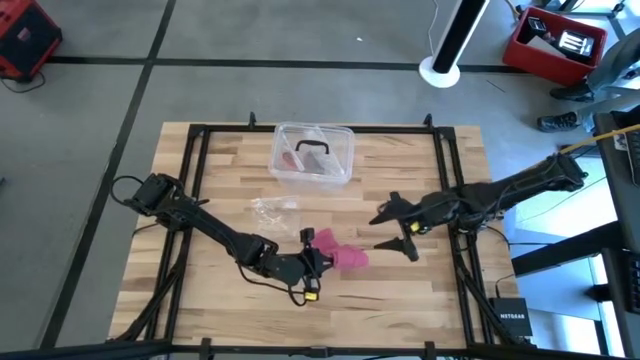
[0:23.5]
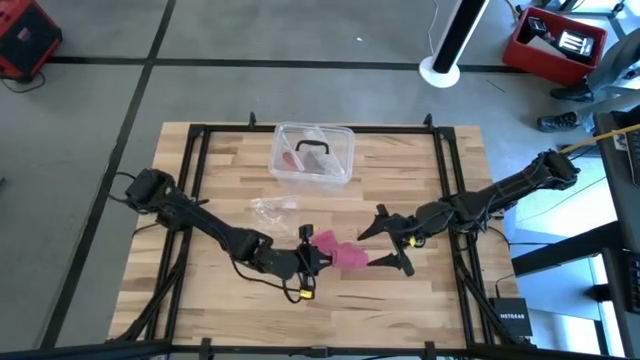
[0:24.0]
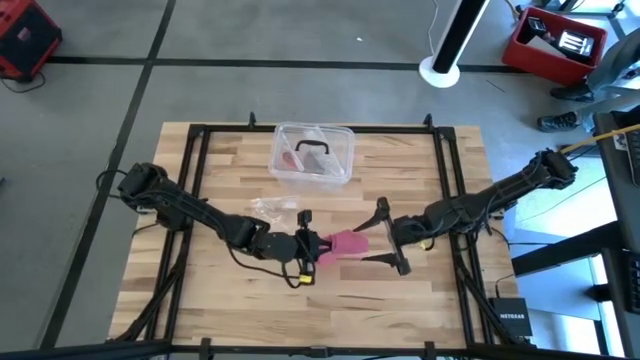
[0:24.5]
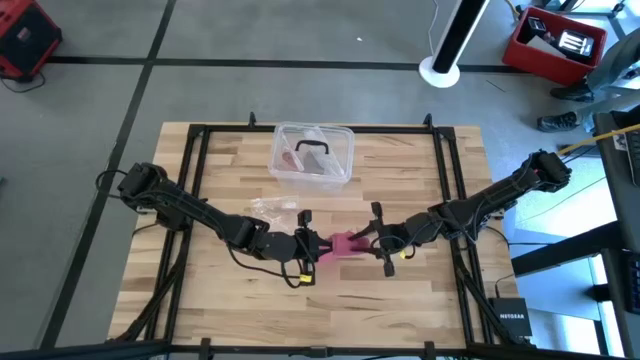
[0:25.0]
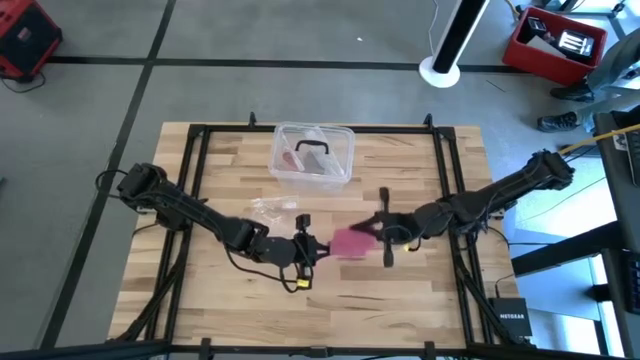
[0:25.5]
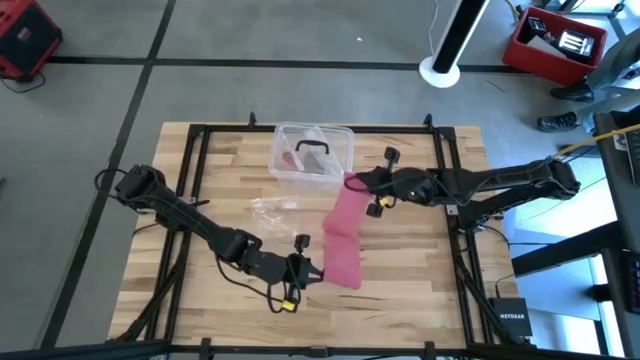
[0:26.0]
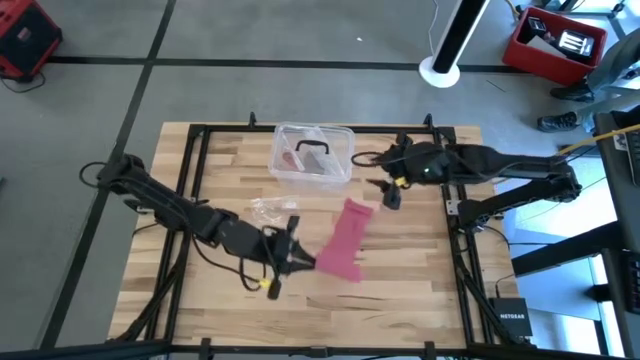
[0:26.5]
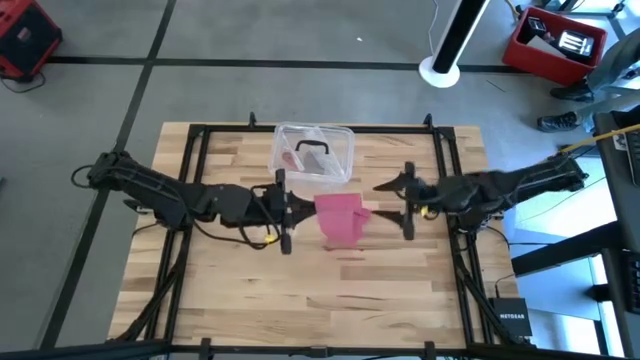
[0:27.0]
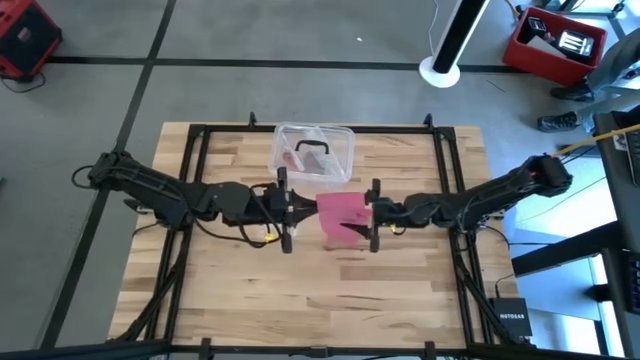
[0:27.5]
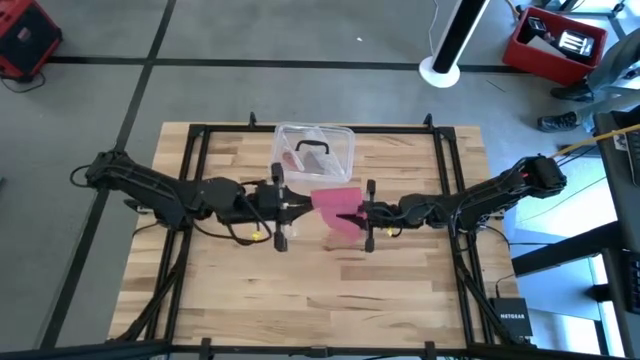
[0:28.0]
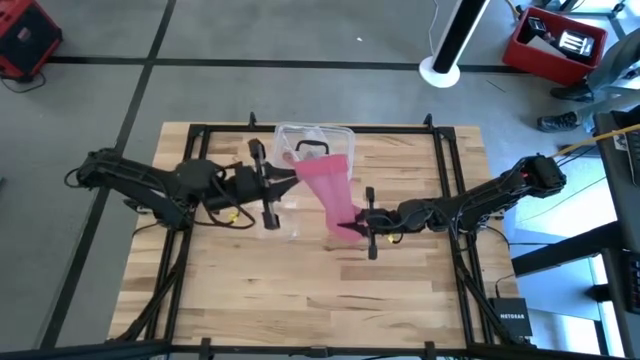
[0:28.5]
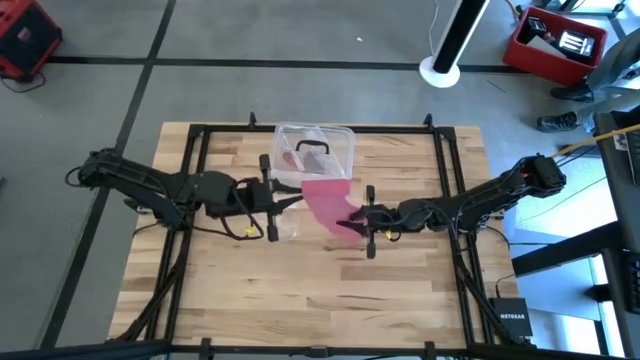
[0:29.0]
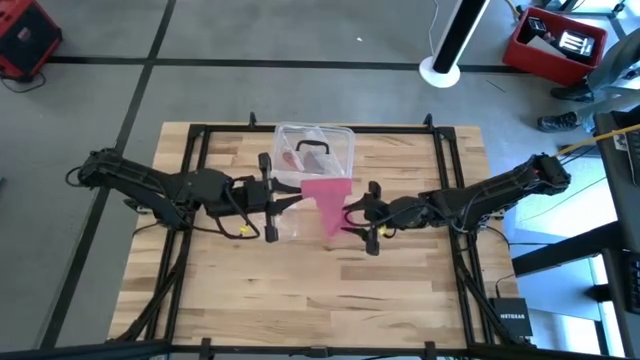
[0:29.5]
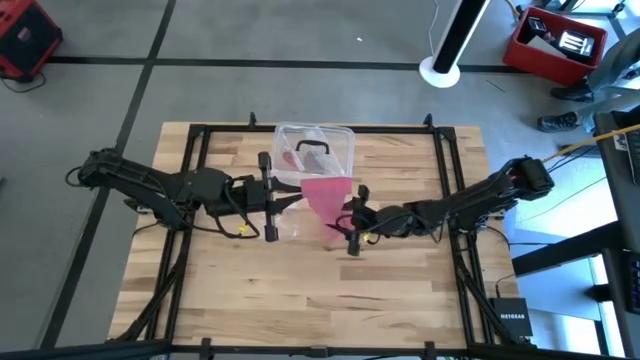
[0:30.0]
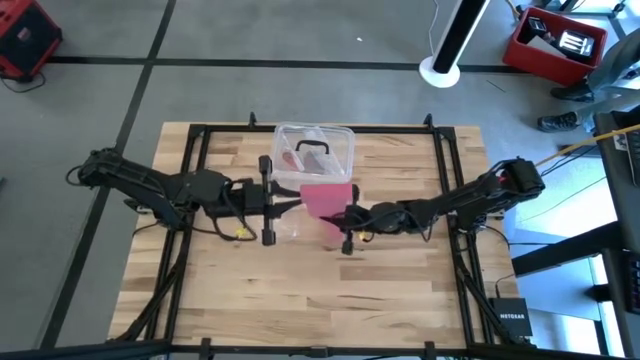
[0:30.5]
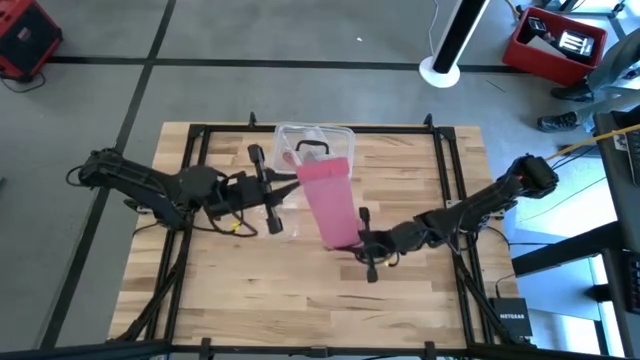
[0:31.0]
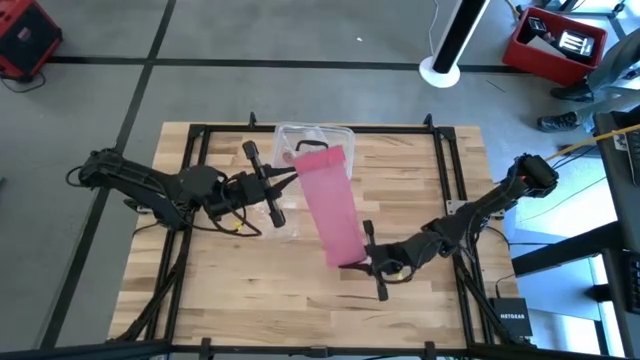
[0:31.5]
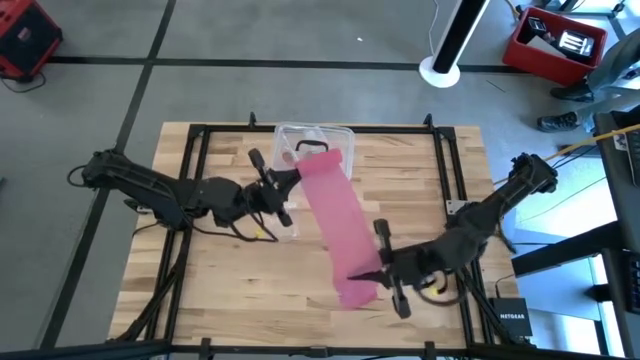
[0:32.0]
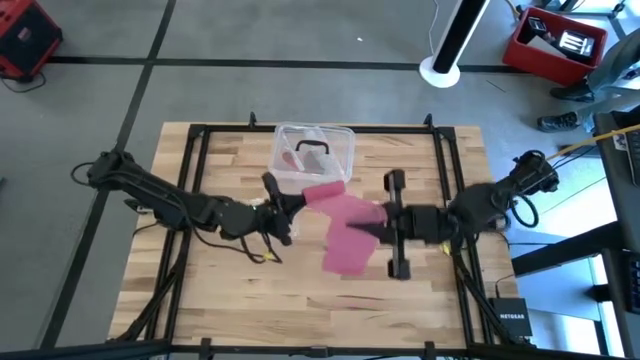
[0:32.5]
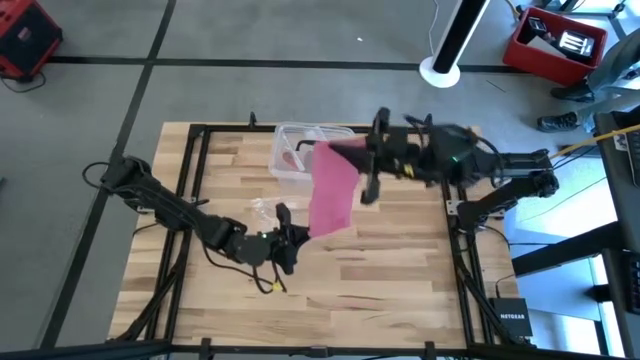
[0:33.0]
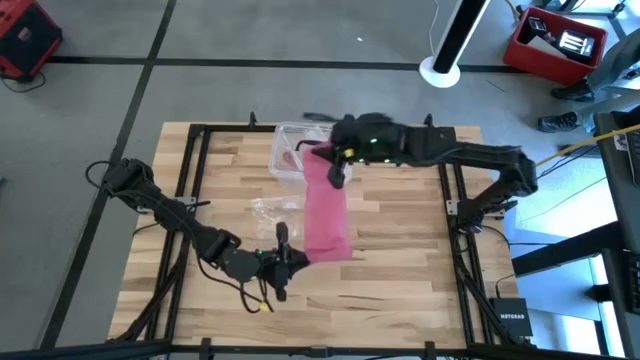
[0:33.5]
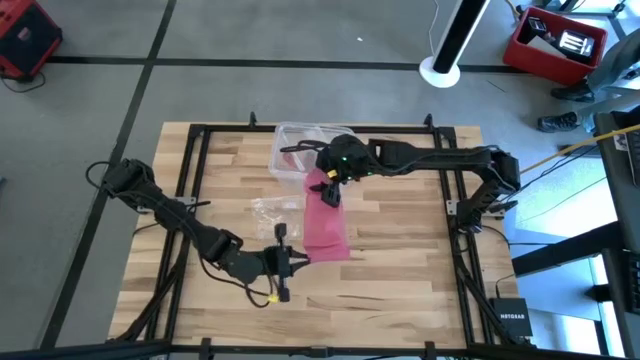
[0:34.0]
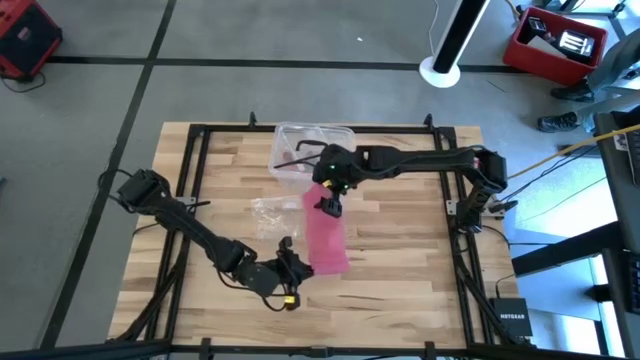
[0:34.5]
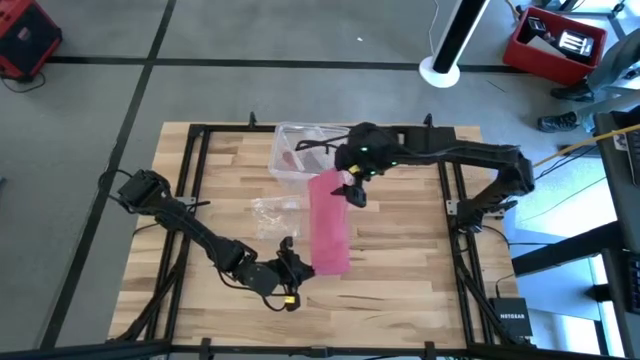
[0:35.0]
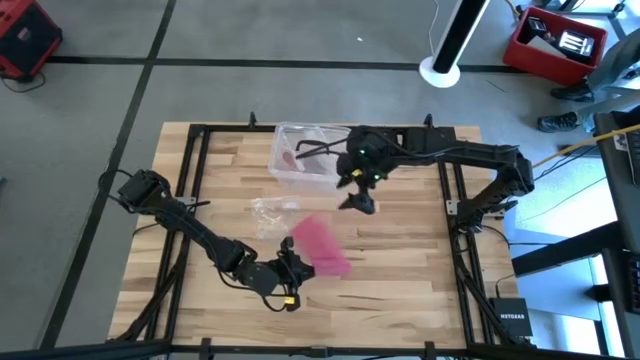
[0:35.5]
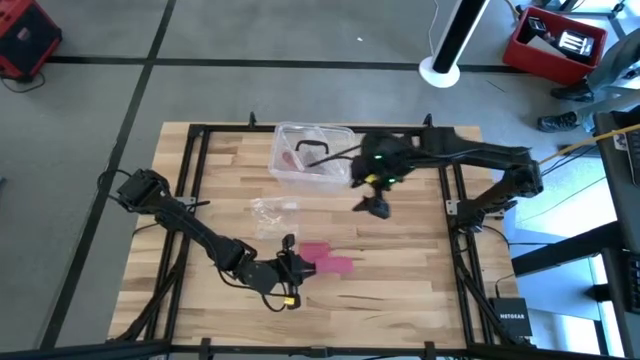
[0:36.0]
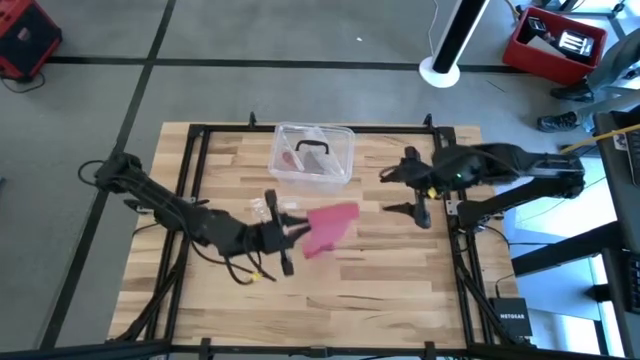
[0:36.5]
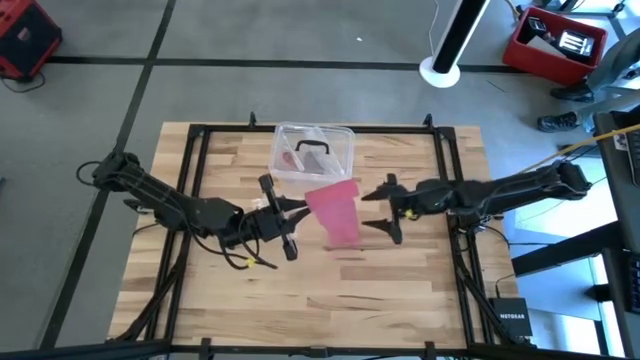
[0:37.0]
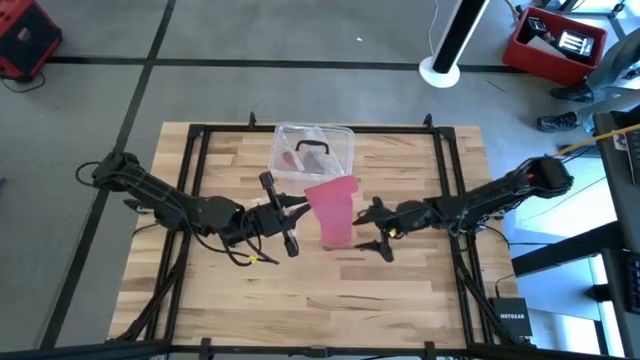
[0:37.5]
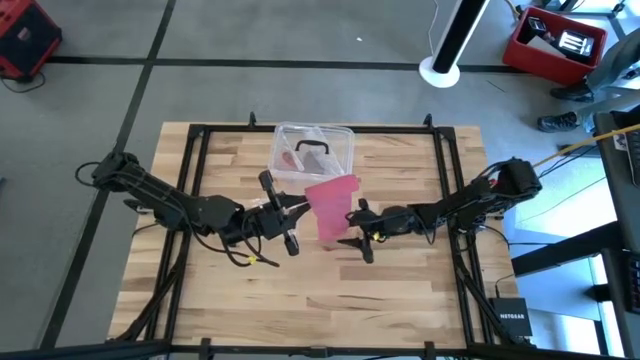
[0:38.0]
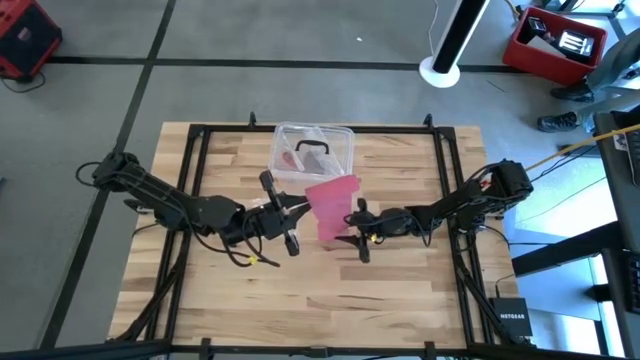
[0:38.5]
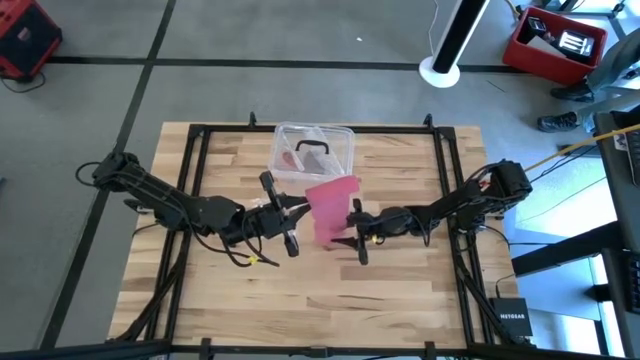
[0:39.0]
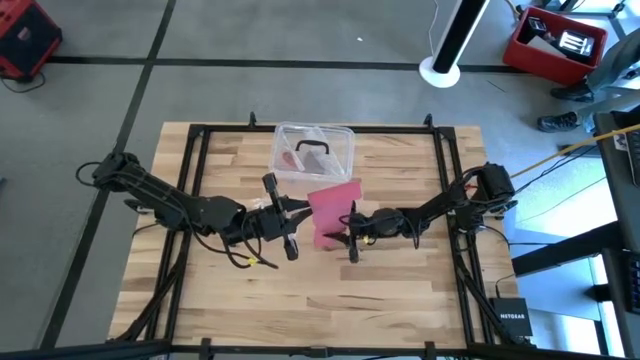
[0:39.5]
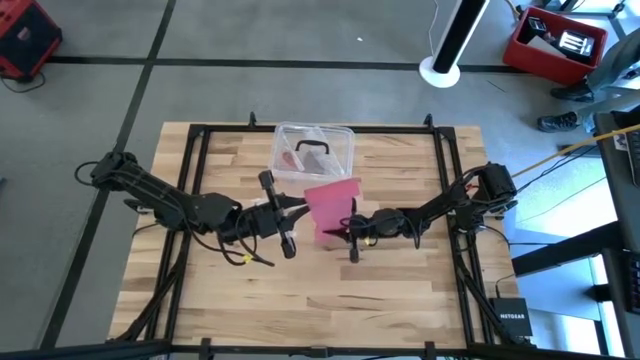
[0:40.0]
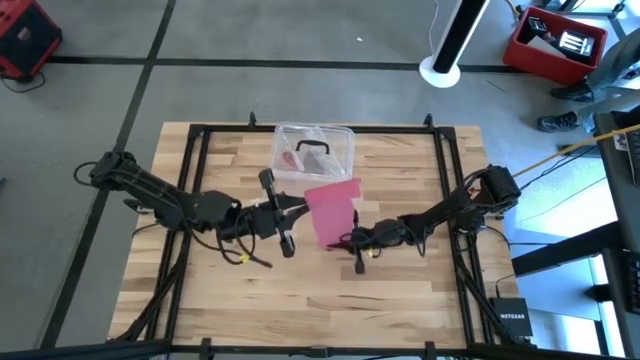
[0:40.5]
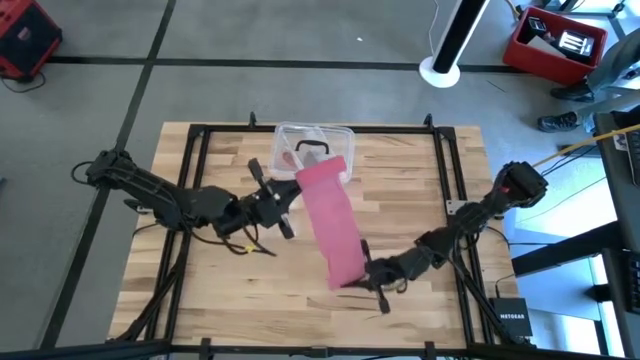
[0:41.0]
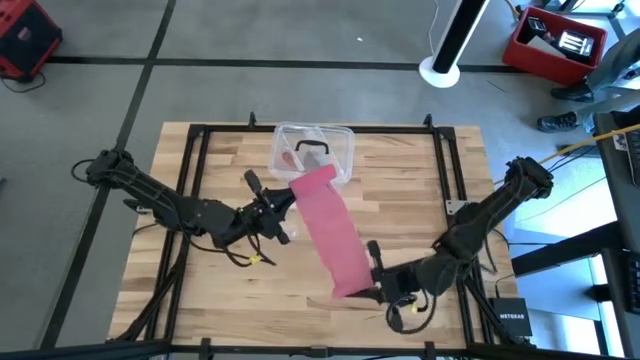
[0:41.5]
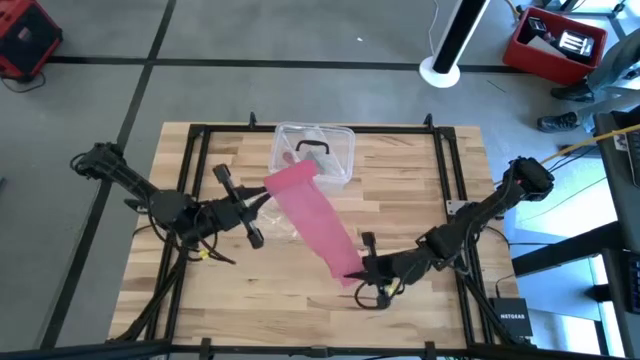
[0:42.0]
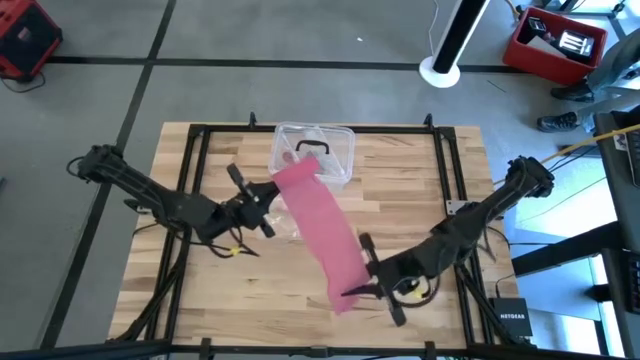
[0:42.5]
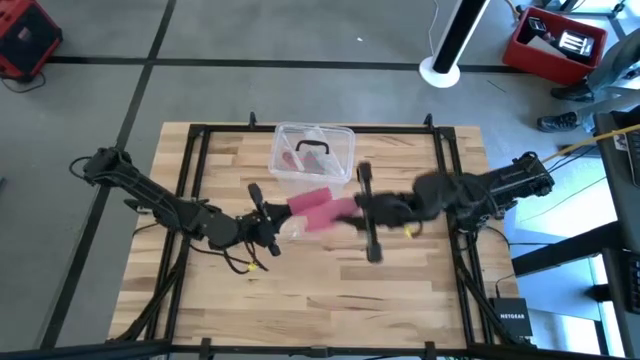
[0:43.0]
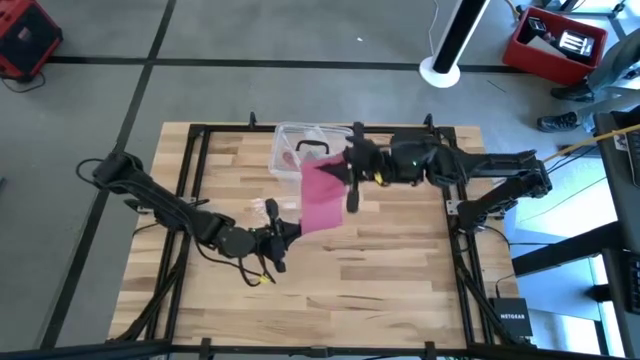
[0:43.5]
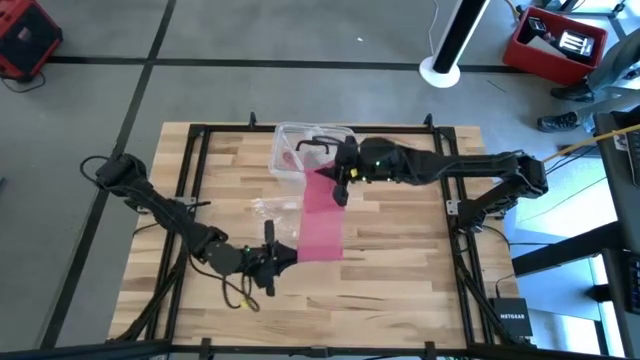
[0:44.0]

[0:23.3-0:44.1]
Task: Roll bandage
Roll the pink bandage
